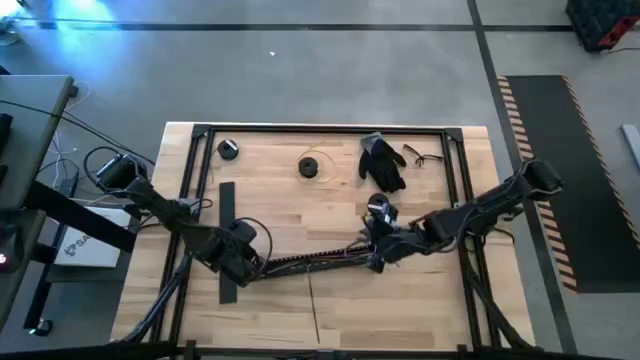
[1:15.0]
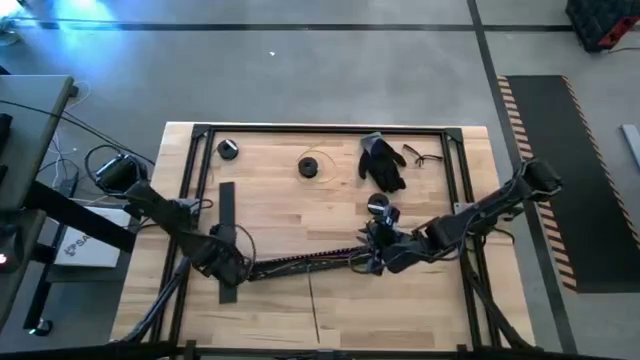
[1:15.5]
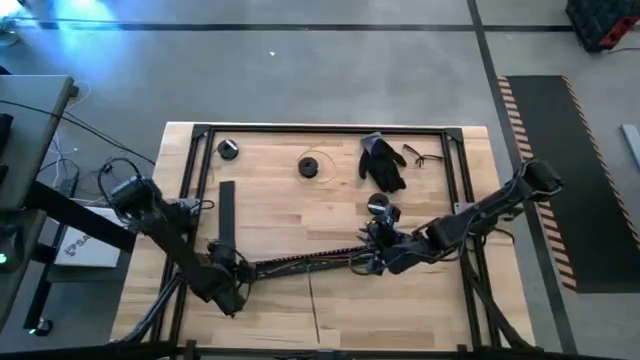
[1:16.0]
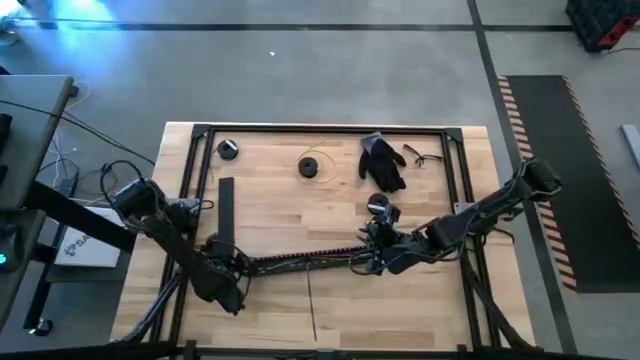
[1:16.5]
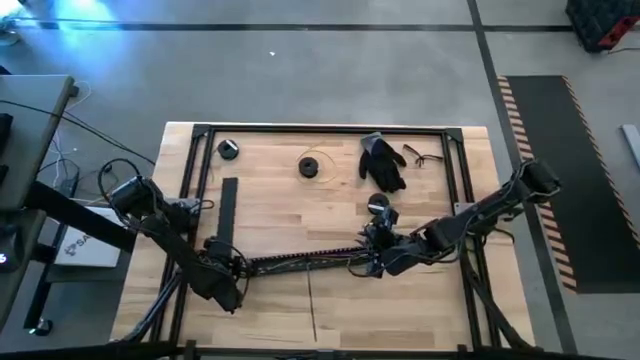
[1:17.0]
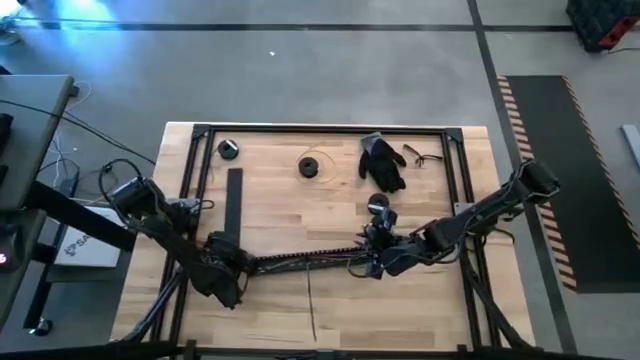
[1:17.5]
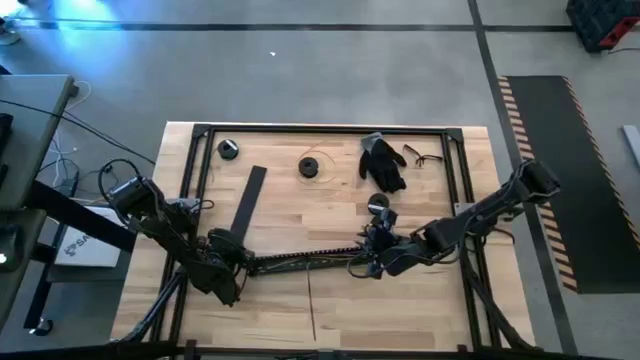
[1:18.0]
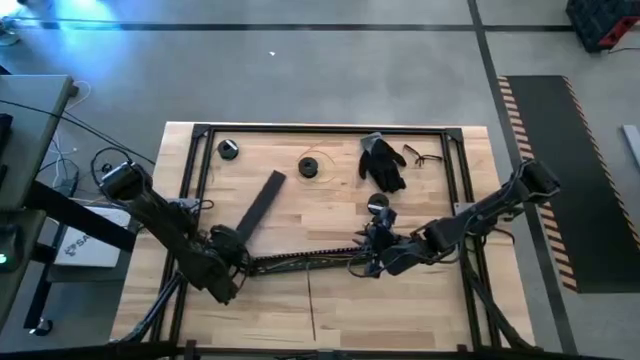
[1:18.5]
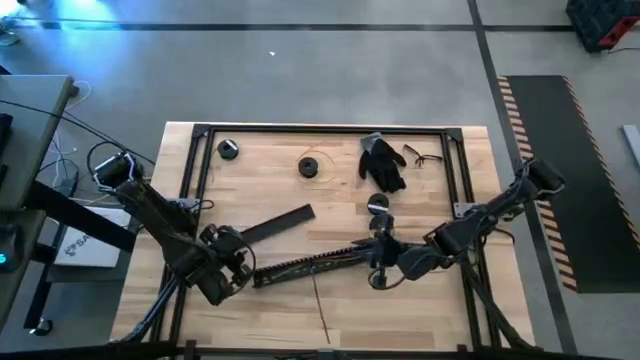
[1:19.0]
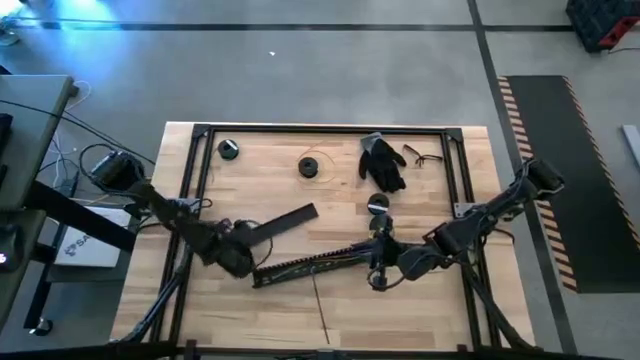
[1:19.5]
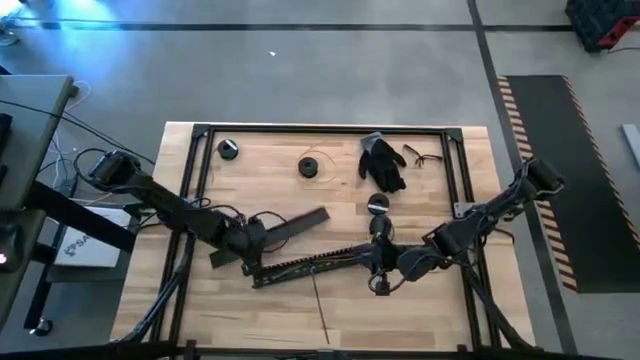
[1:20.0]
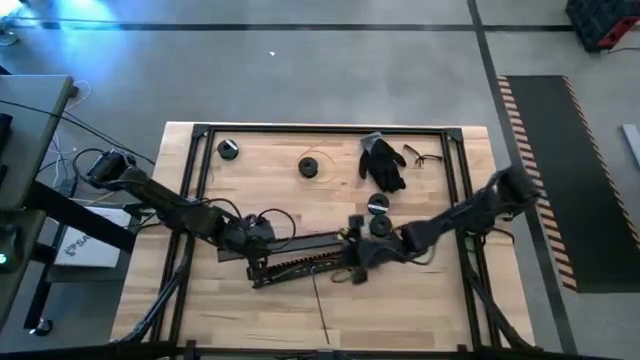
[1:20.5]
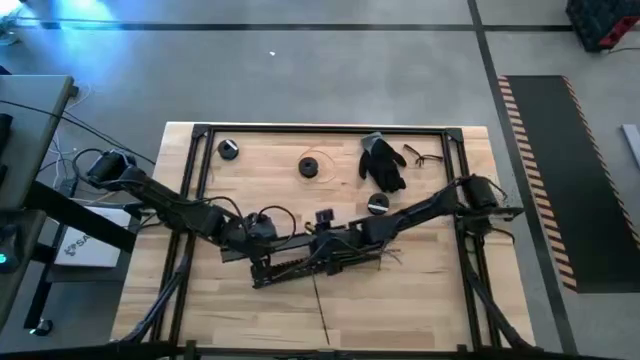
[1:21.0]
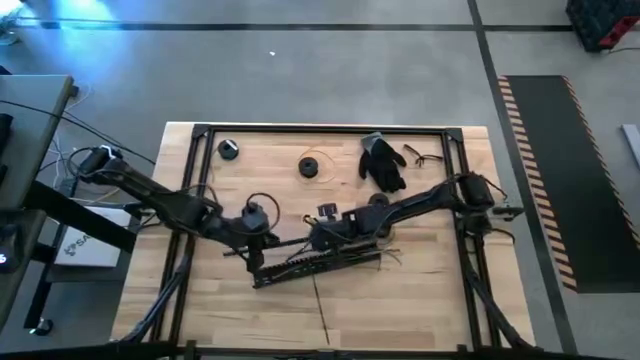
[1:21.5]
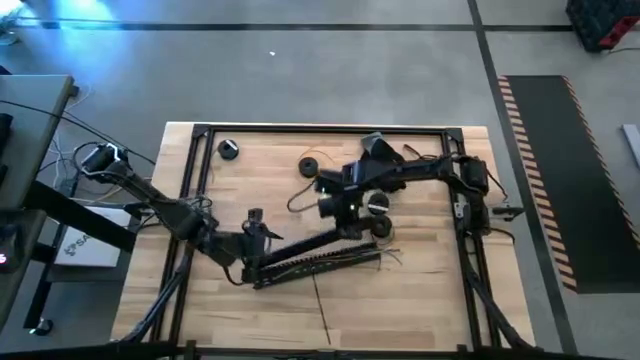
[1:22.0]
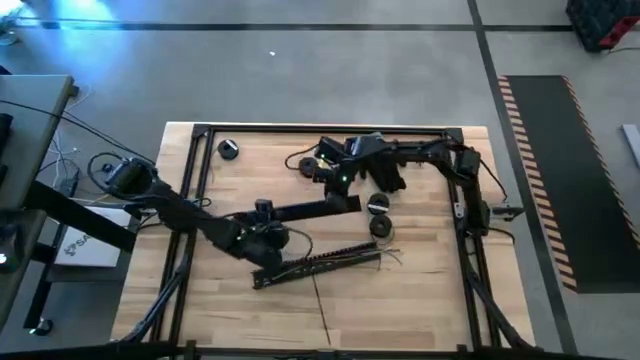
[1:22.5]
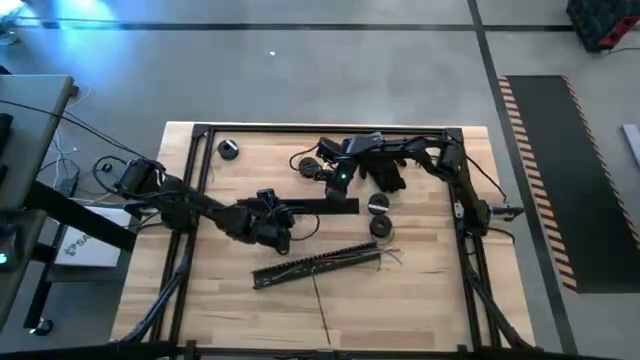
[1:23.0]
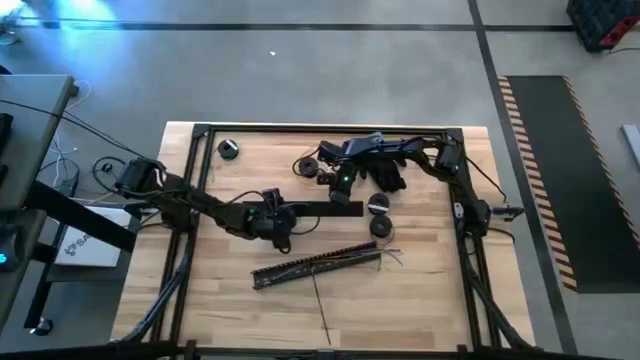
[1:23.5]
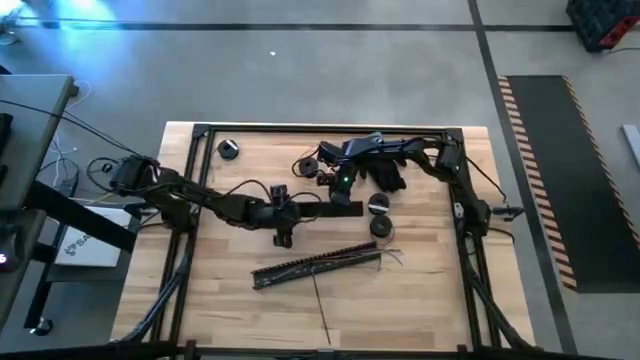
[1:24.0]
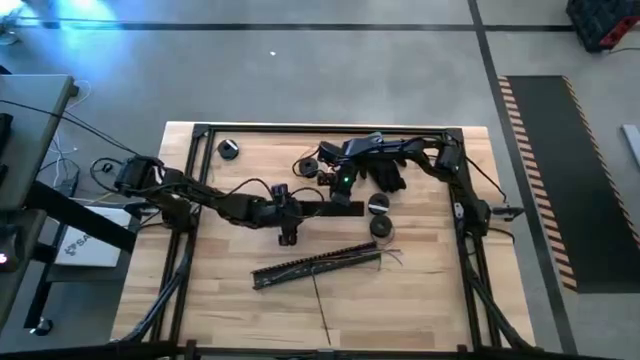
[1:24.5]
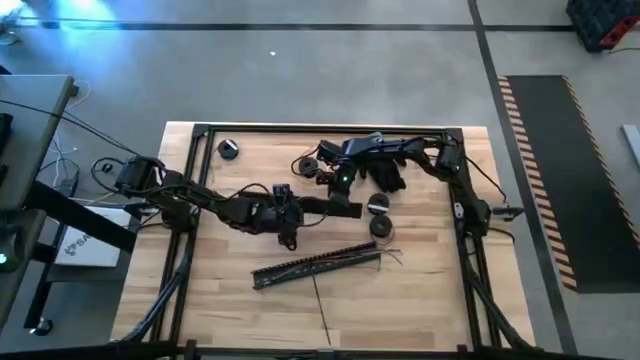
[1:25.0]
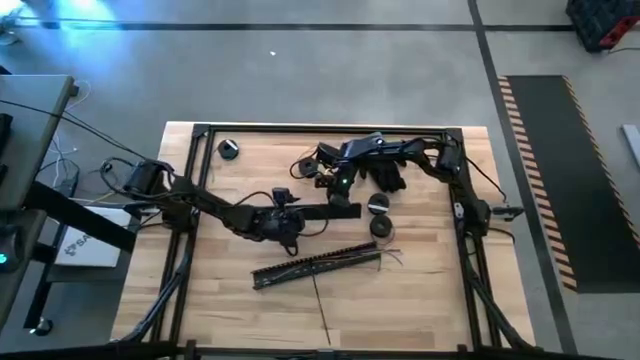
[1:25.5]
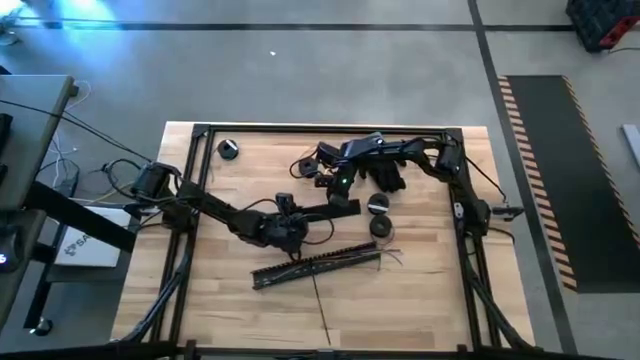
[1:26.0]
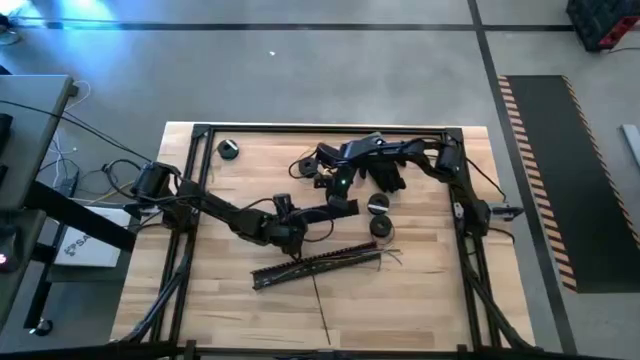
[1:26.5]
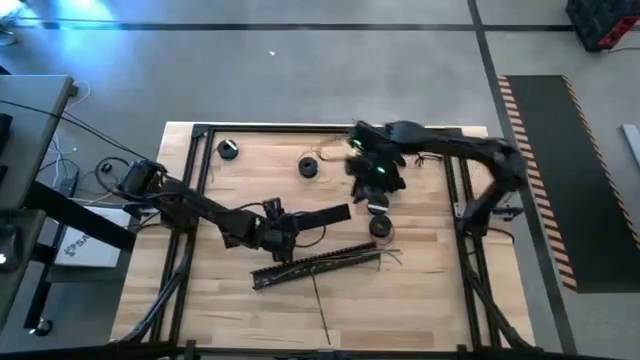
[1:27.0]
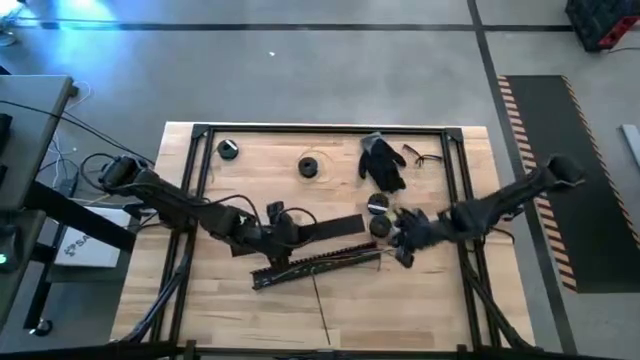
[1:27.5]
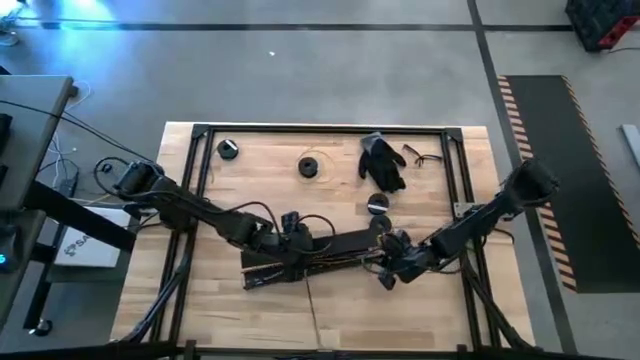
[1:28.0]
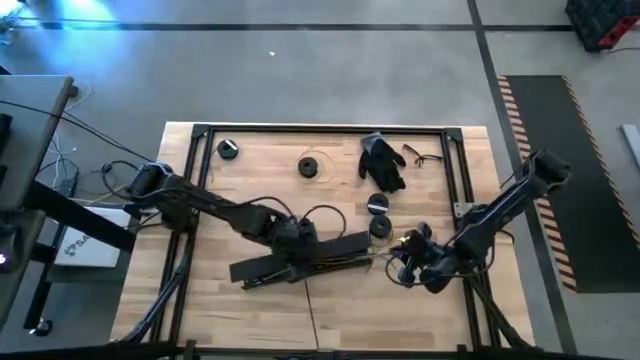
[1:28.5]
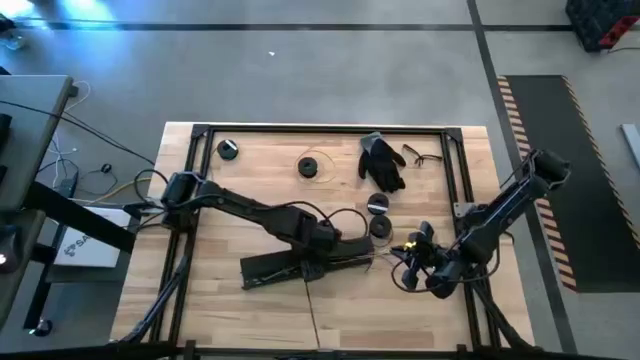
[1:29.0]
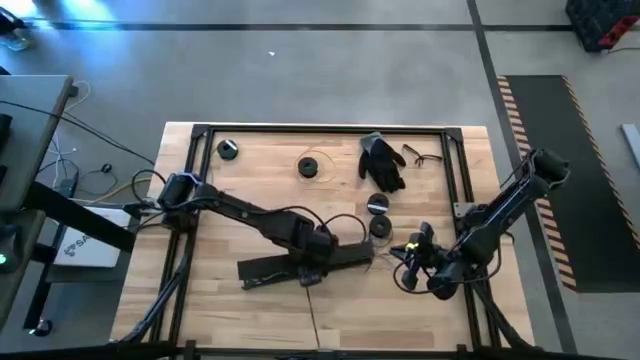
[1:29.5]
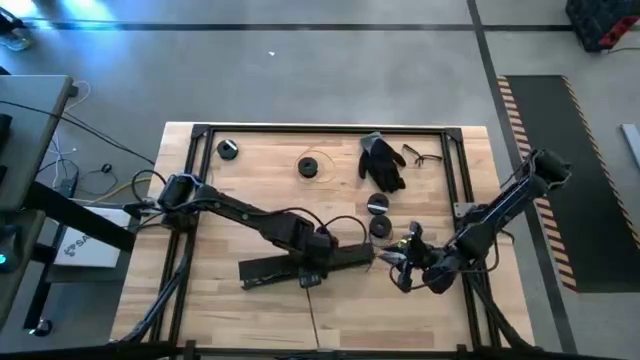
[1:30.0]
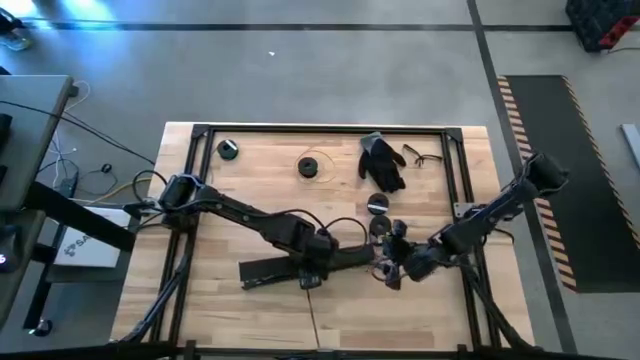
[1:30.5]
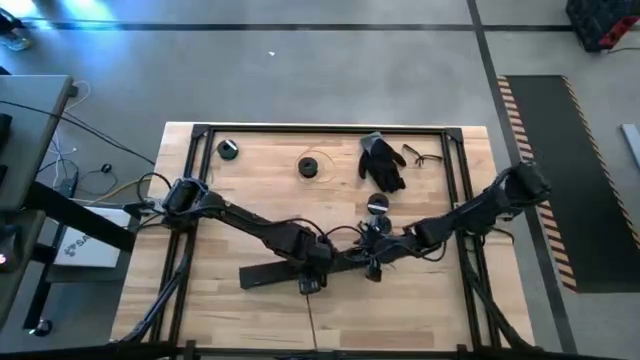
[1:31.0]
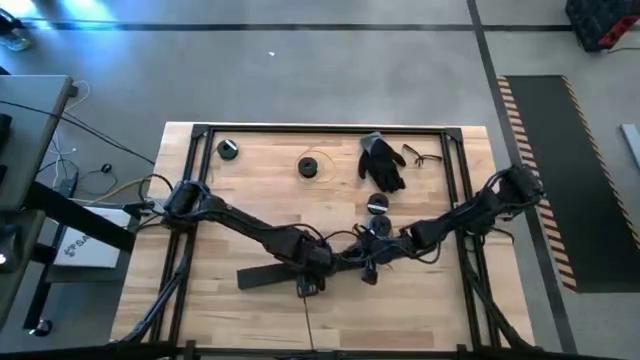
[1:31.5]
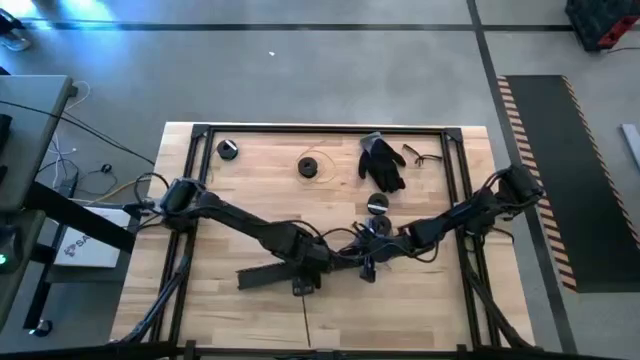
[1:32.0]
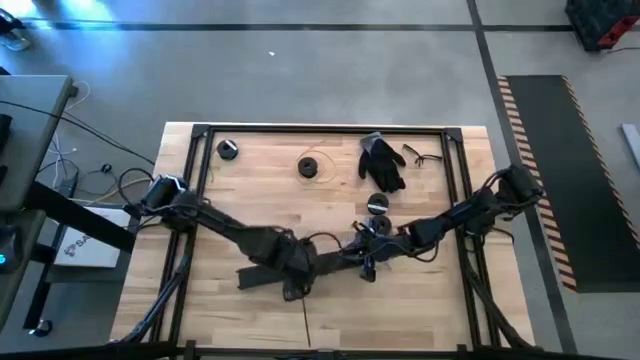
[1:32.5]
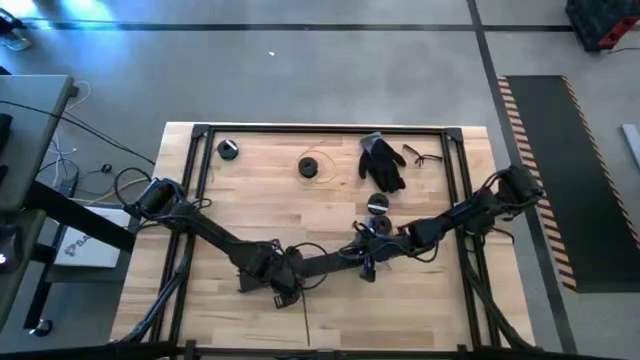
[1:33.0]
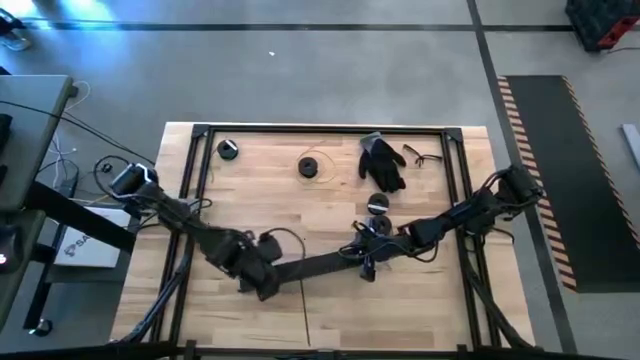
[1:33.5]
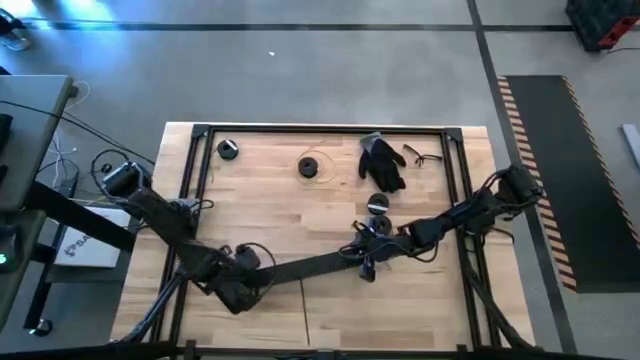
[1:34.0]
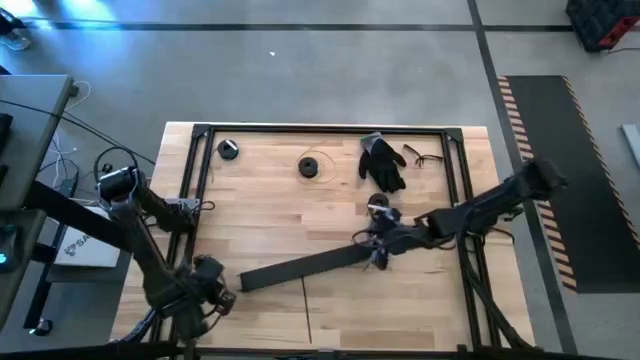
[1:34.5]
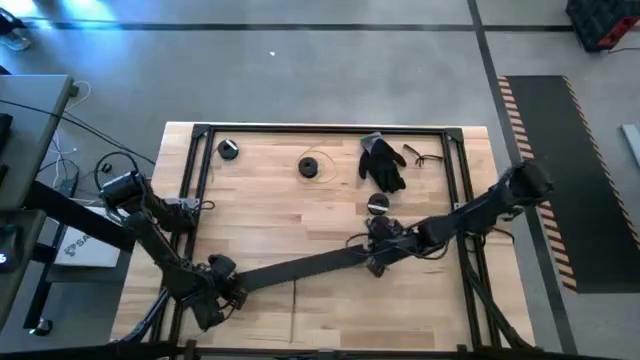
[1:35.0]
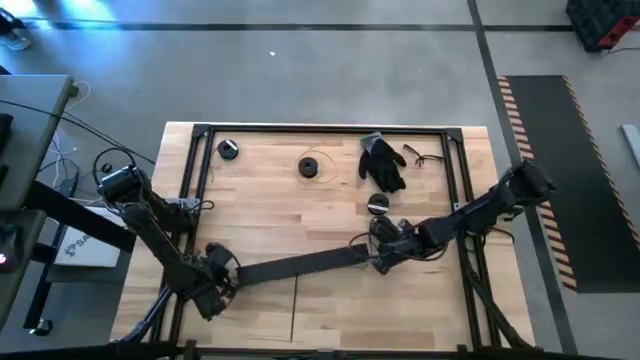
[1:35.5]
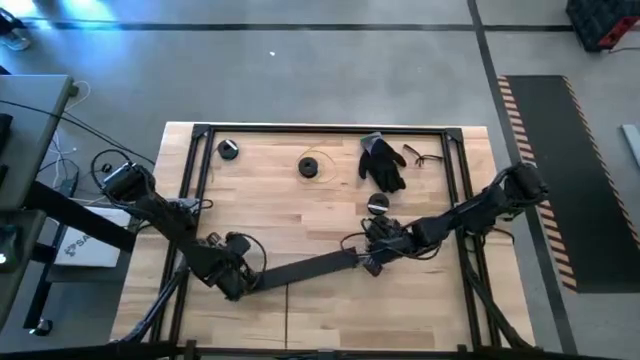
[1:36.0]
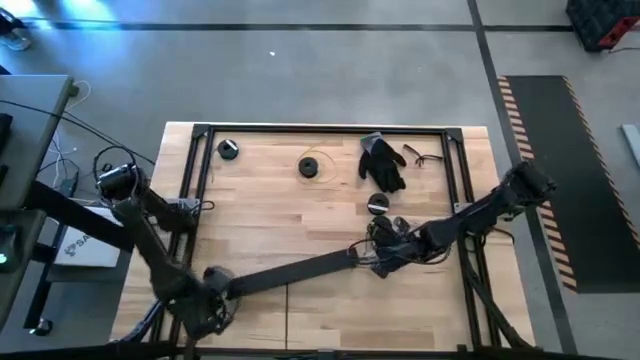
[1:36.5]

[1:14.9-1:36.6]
Task: Ziptie cables
Close the black cable duct
